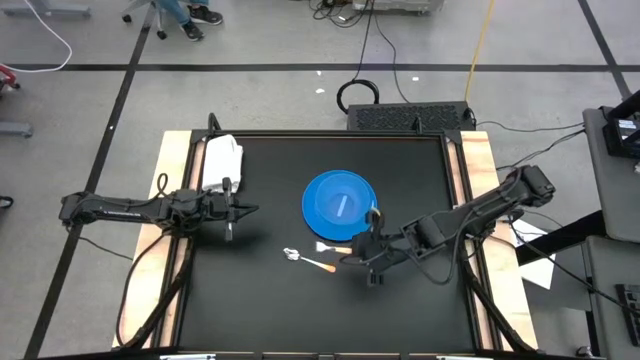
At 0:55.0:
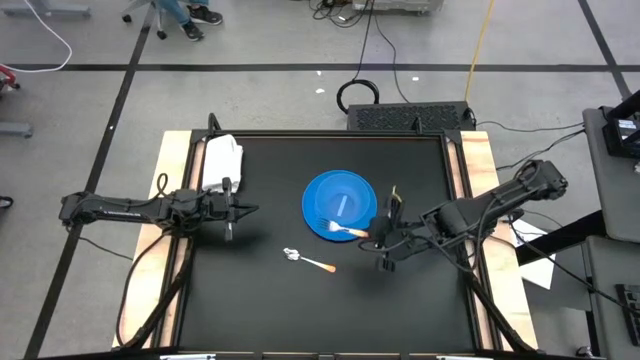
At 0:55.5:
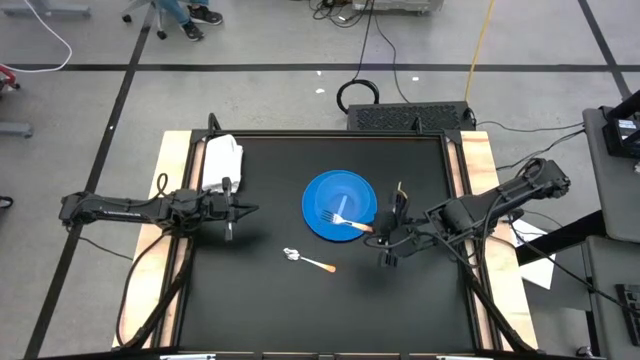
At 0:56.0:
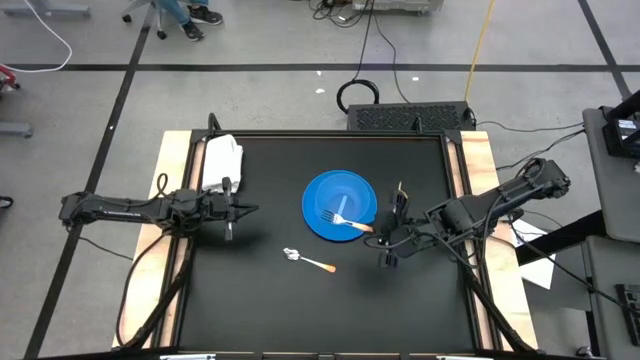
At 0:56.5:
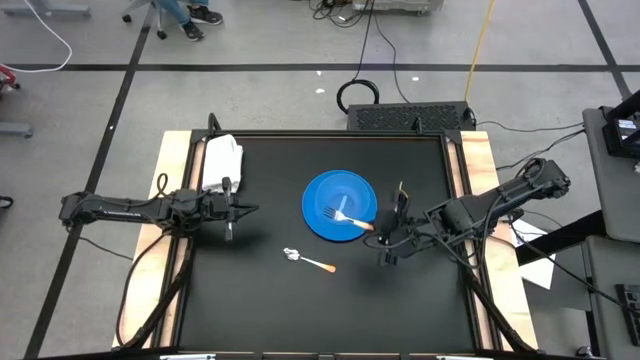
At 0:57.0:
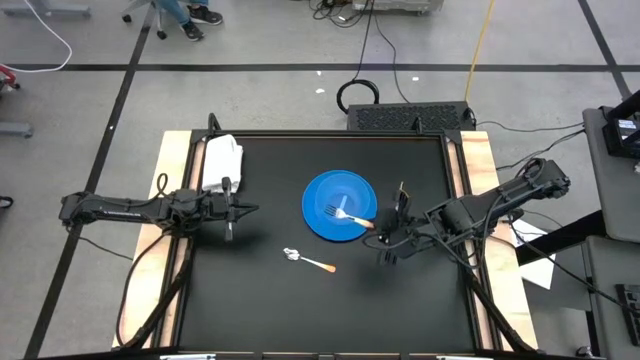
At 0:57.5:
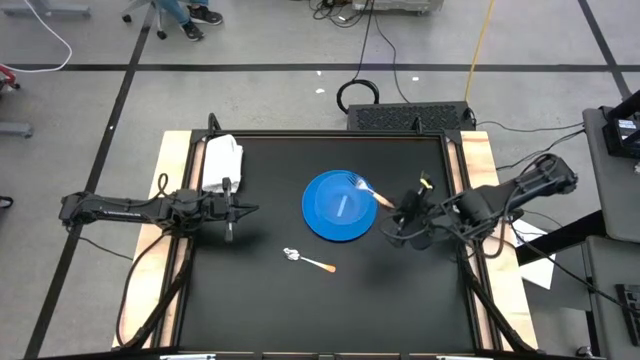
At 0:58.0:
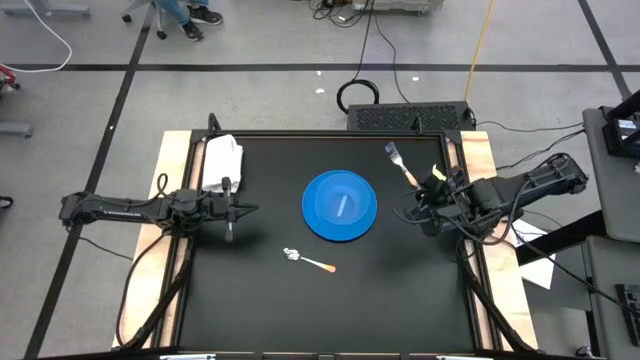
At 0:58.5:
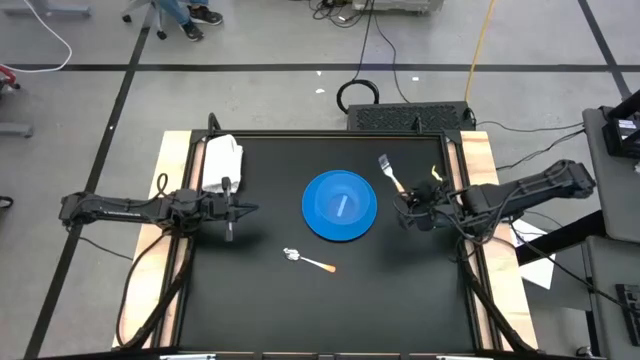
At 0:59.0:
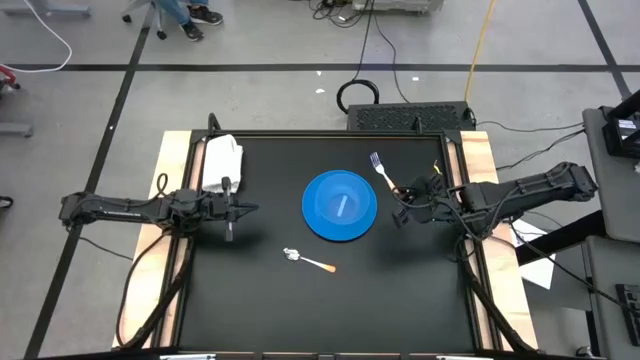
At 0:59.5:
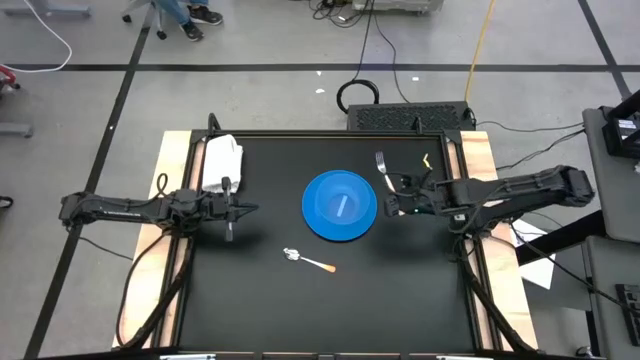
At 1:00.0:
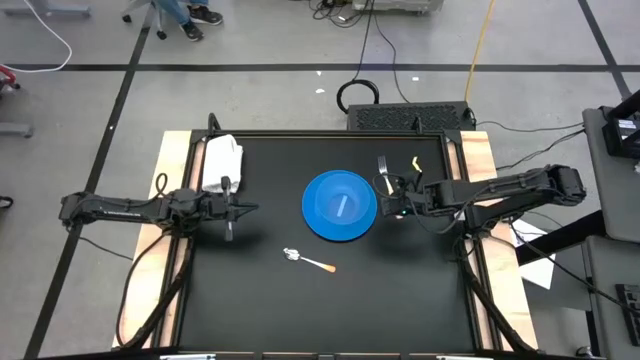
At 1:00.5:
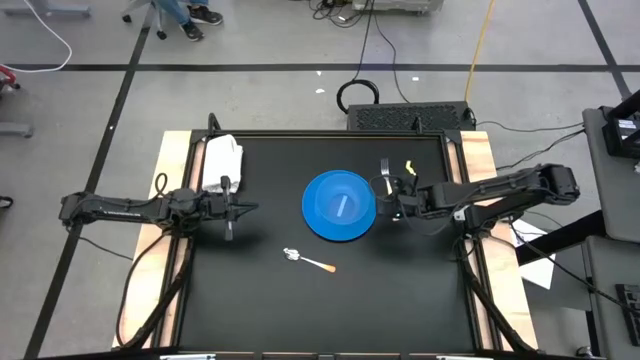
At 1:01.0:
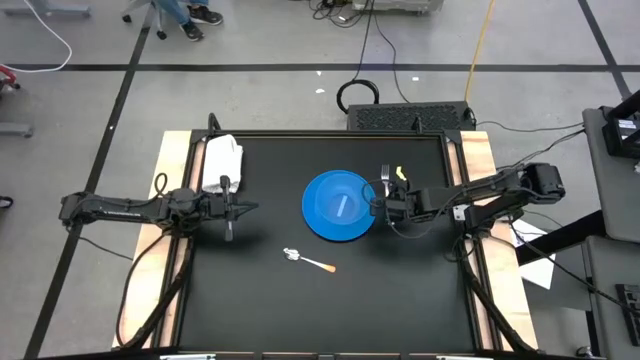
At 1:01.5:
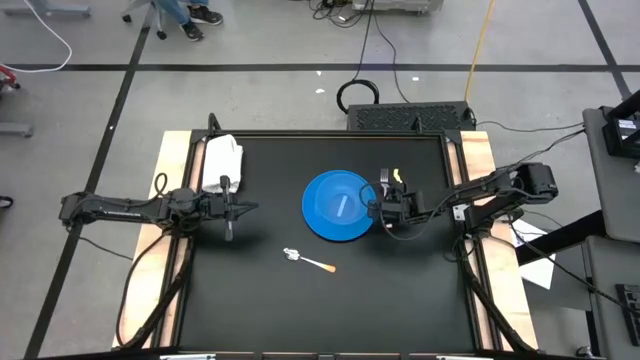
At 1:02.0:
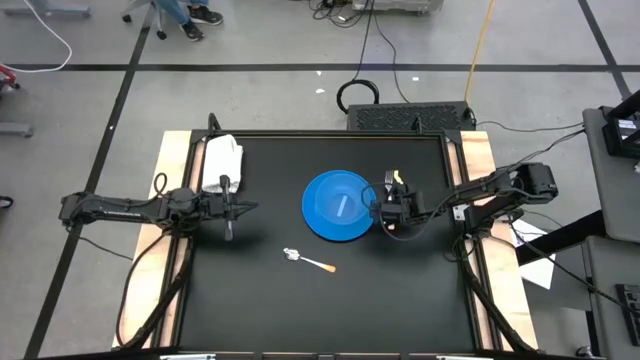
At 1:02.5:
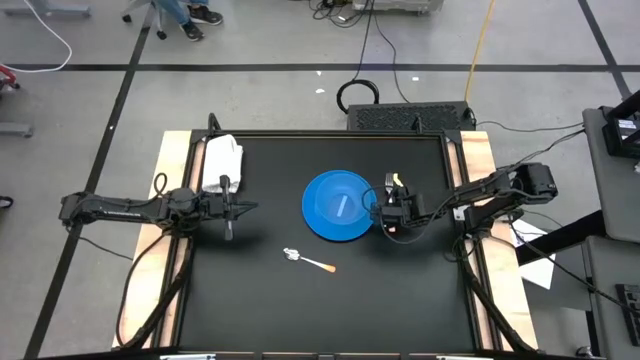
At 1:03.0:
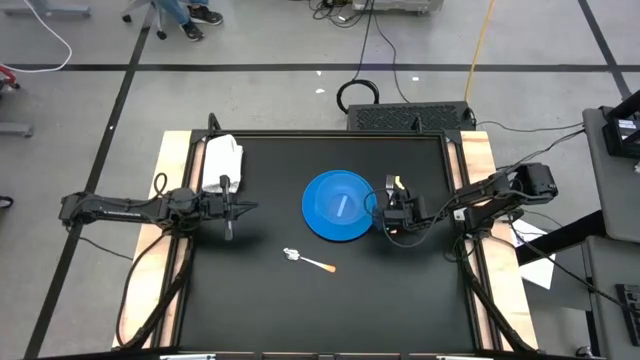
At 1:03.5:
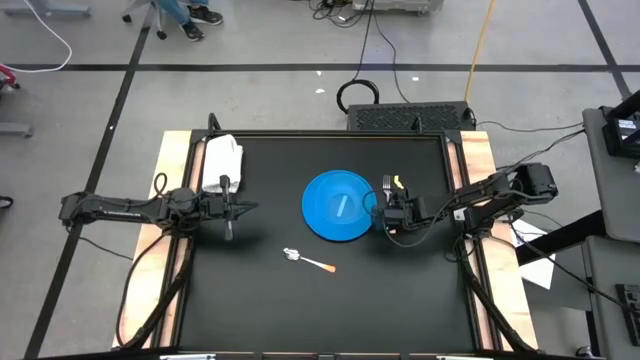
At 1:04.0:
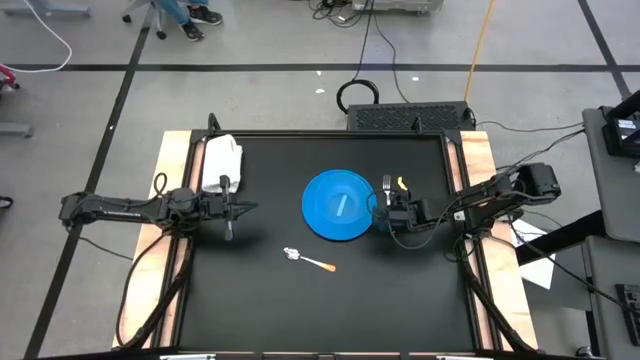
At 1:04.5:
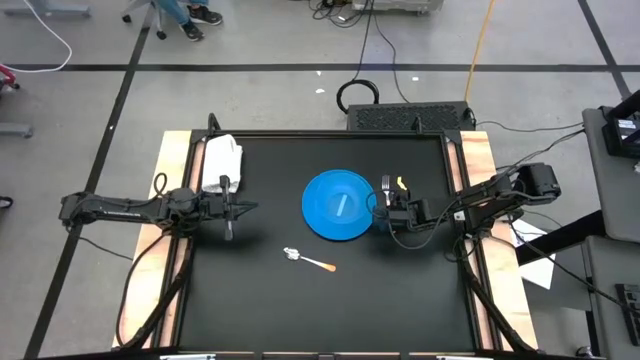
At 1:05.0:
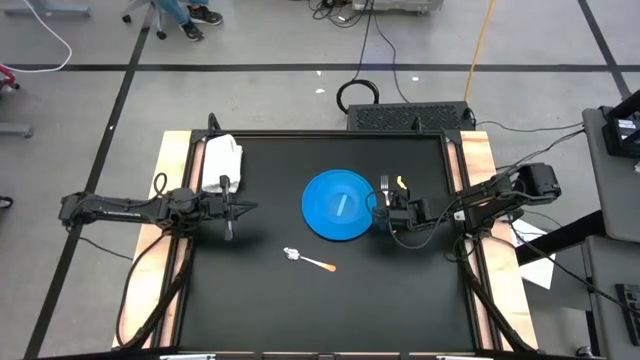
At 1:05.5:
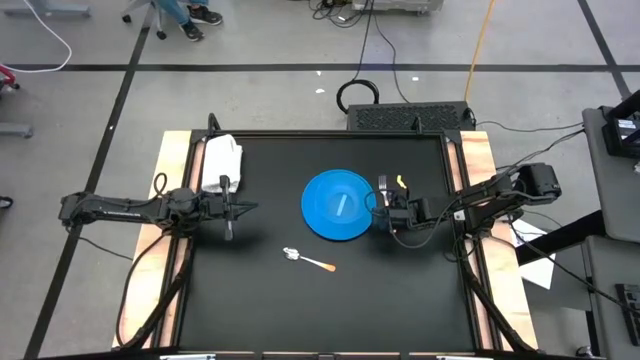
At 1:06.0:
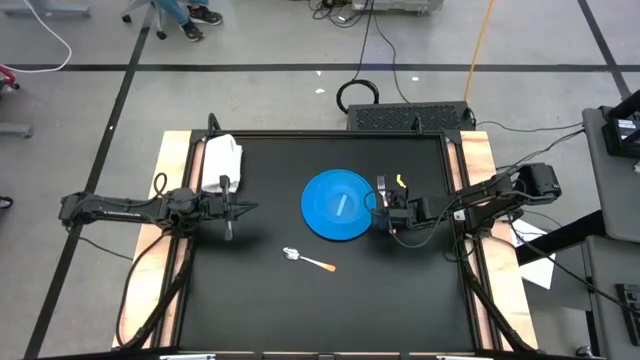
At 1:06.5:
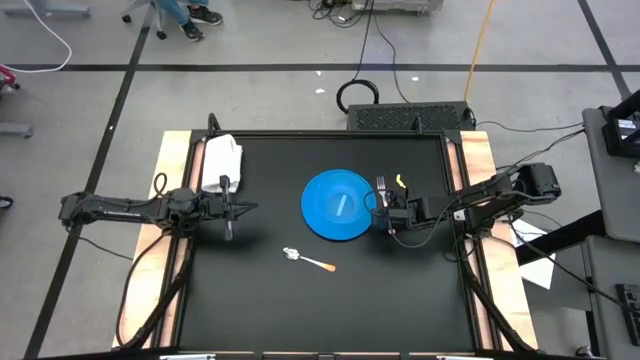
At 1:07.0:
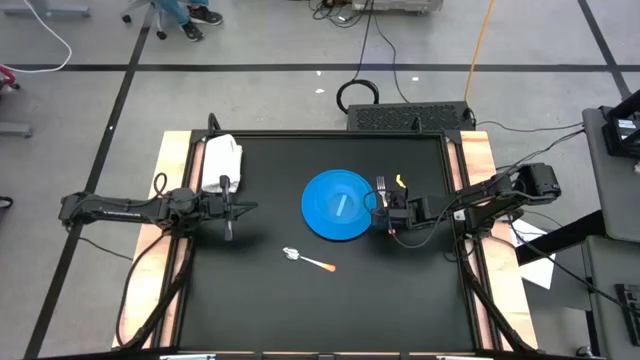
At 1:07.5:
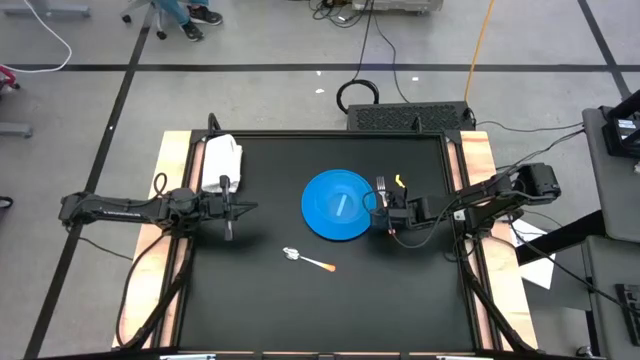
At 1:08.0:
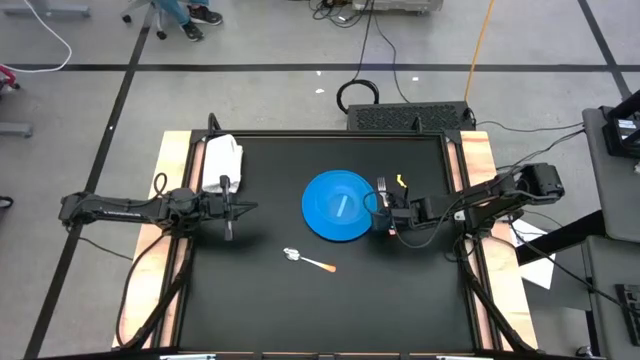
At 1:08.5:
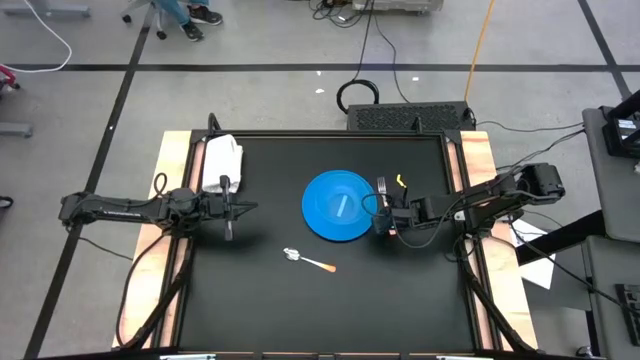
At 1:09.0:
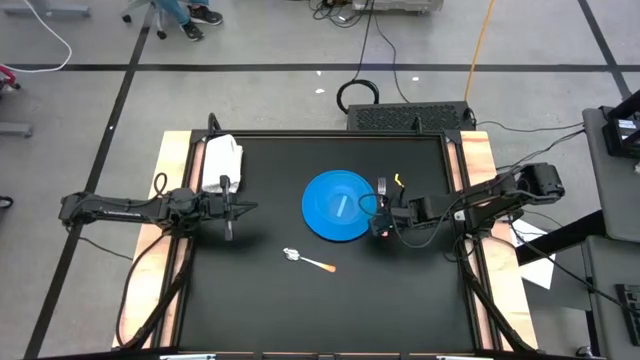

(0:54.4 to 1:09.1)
Task: Set table place
Move the orange fork from the bottom to the right side of the blue plate on the table

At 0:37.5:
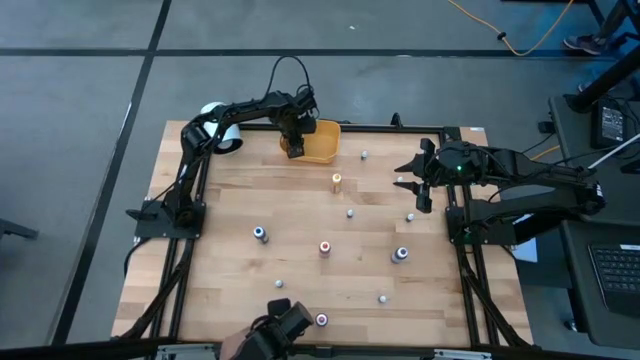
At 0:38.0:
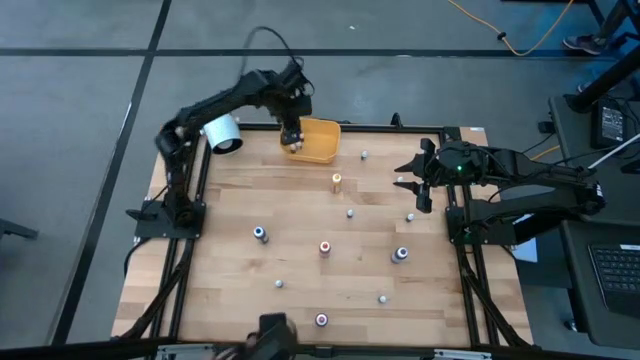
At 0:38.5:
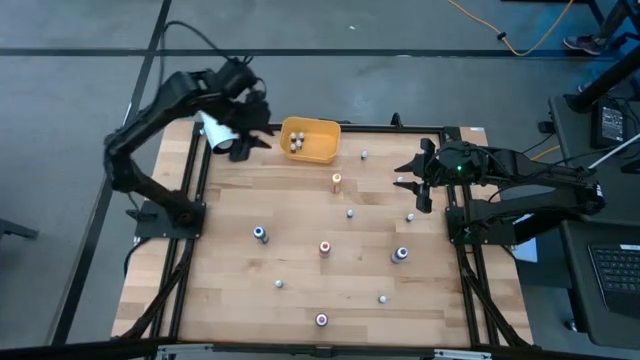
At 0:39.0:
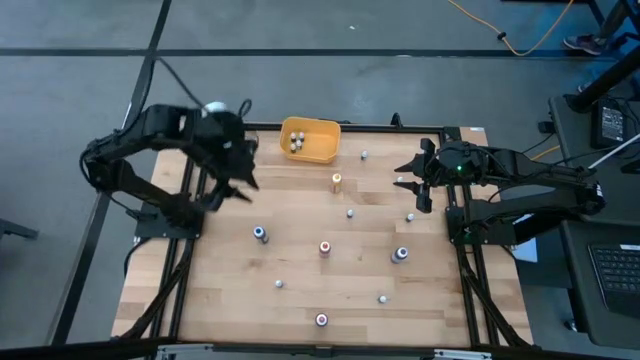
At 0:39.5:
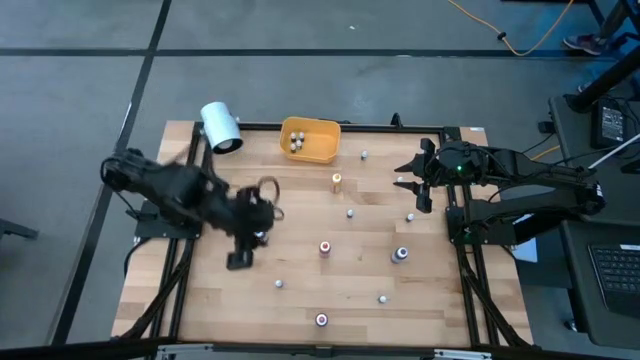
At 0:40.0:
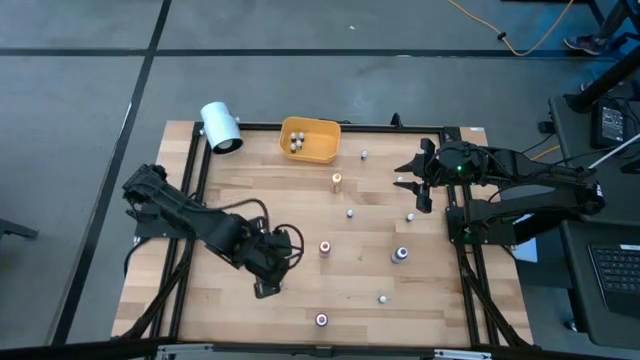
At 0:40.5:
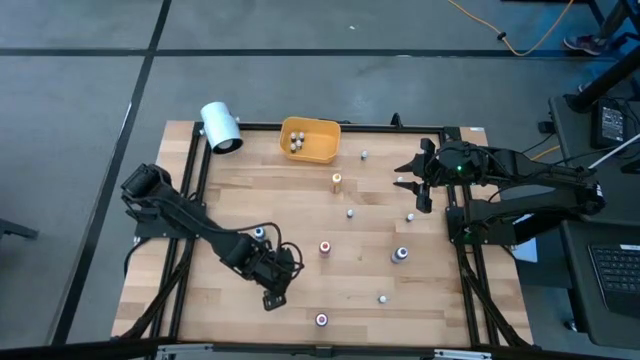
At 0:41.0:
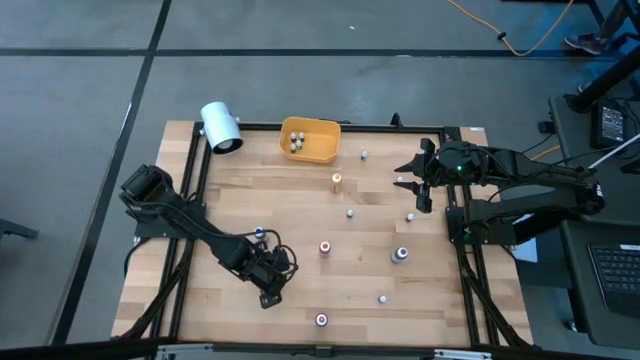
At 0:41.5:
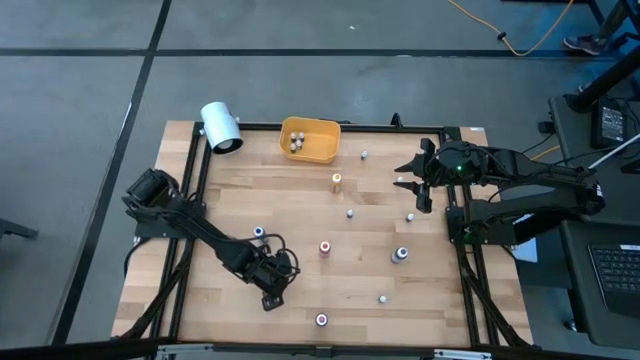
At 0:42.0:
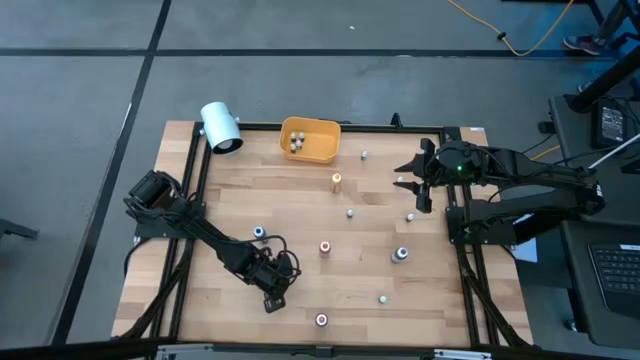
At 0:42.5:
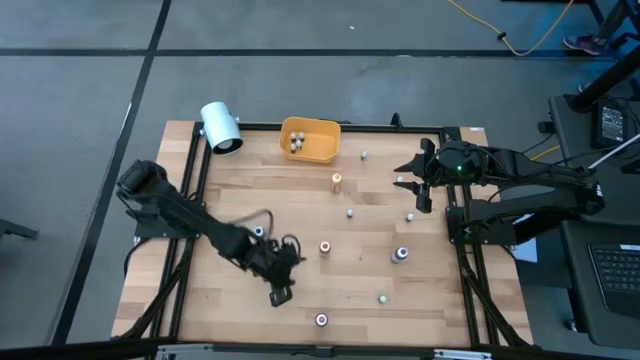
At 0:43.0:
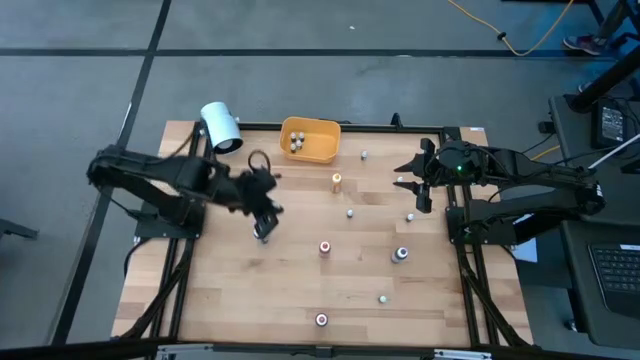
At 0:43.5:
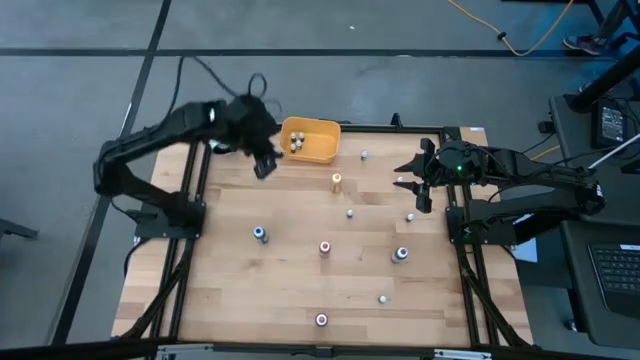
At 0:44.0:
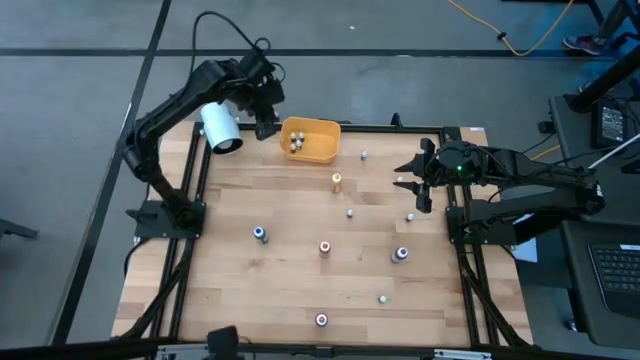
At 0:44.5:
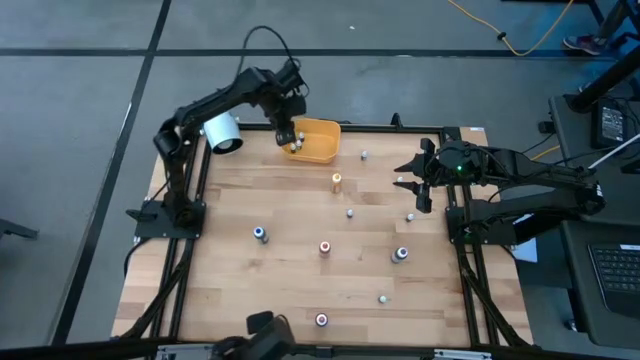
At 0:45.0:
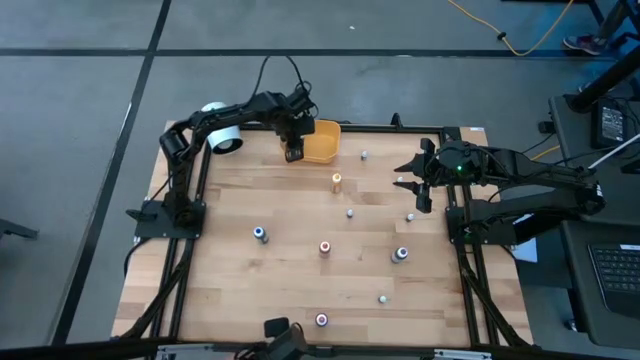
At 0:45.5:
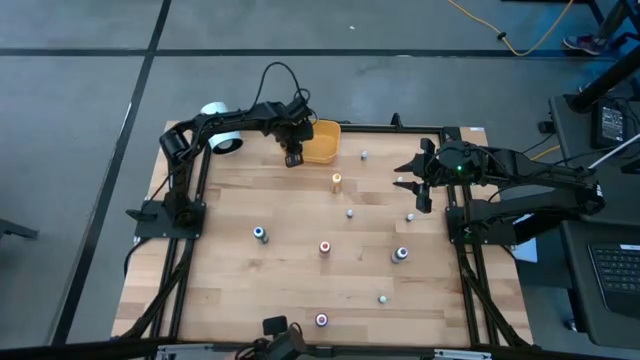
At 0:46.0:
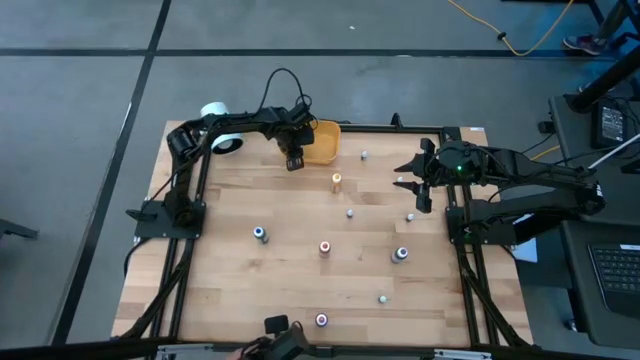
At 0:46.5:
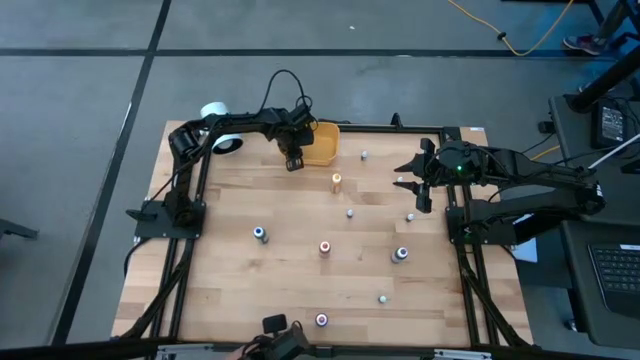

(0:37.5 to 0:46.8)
Task: Pick & Place food coloring
Put the small purple food coloring bottle into the yellow bin
